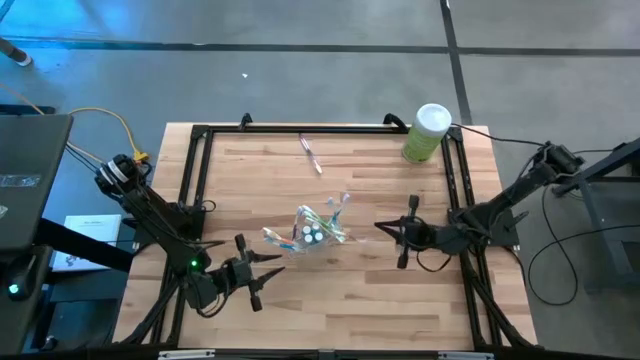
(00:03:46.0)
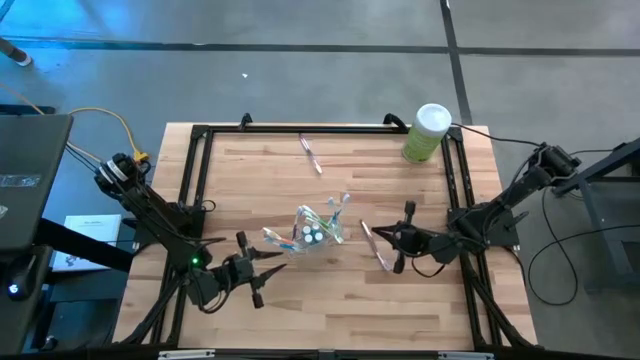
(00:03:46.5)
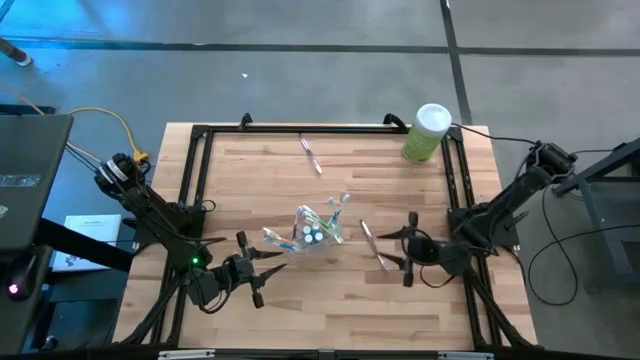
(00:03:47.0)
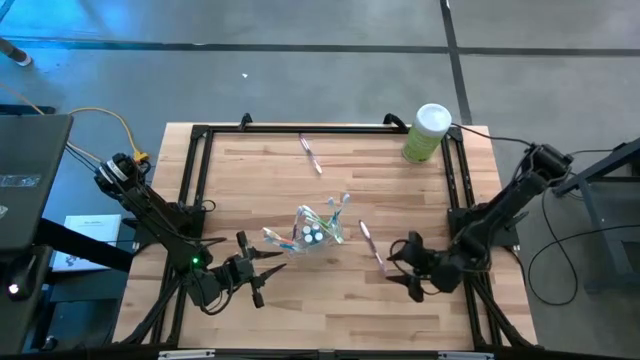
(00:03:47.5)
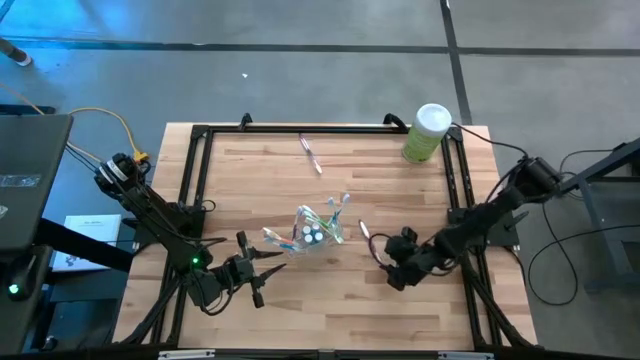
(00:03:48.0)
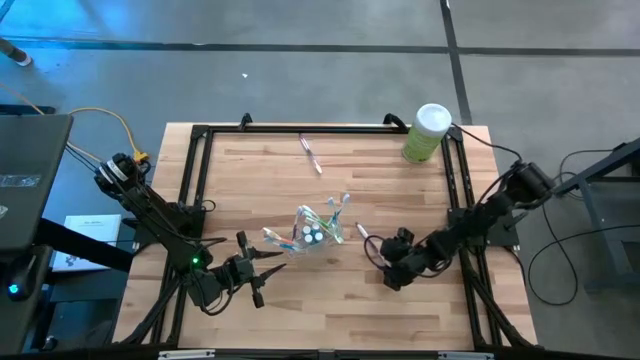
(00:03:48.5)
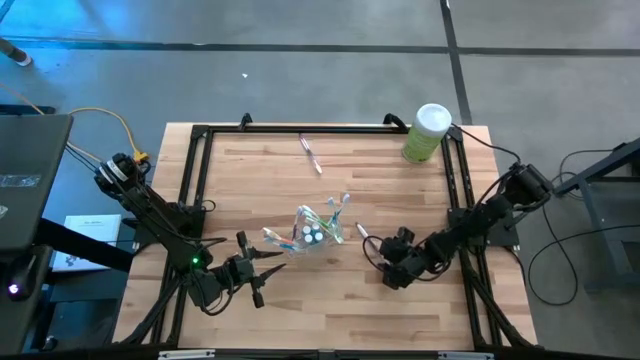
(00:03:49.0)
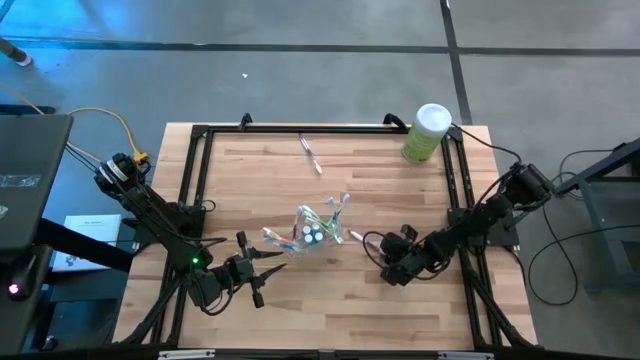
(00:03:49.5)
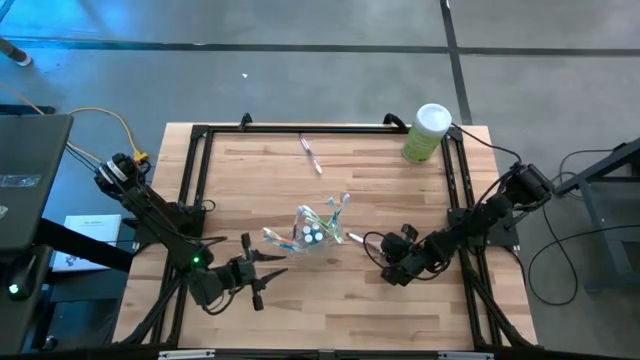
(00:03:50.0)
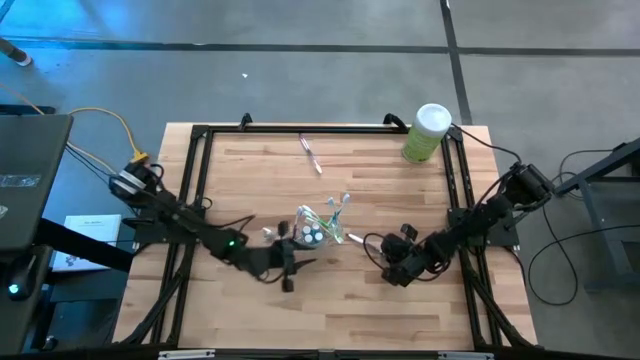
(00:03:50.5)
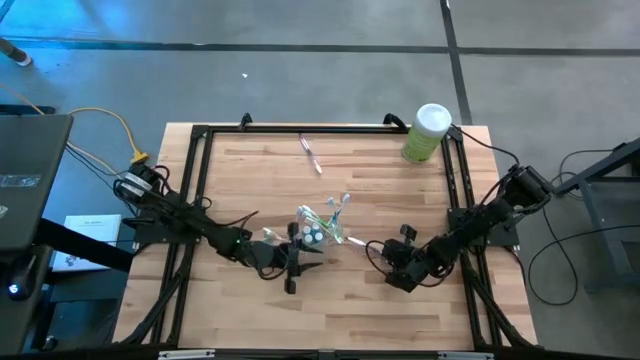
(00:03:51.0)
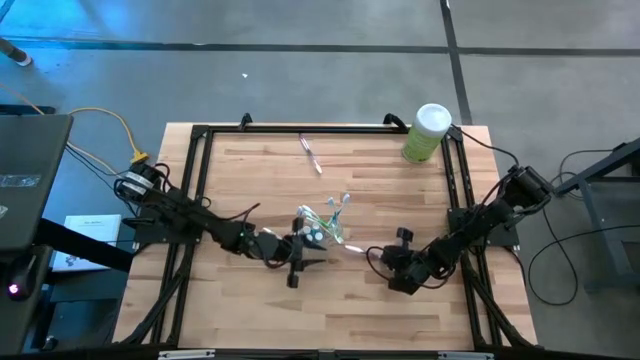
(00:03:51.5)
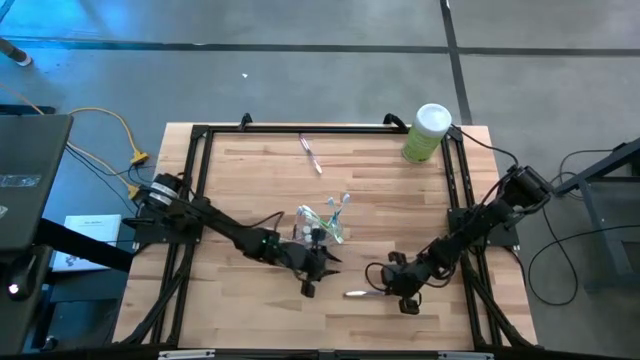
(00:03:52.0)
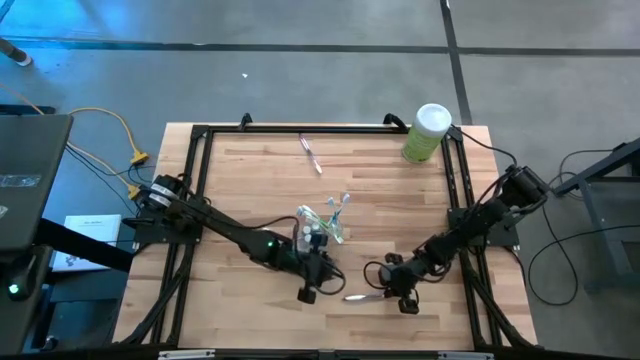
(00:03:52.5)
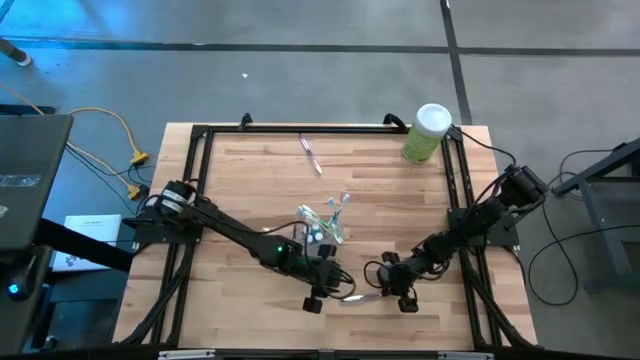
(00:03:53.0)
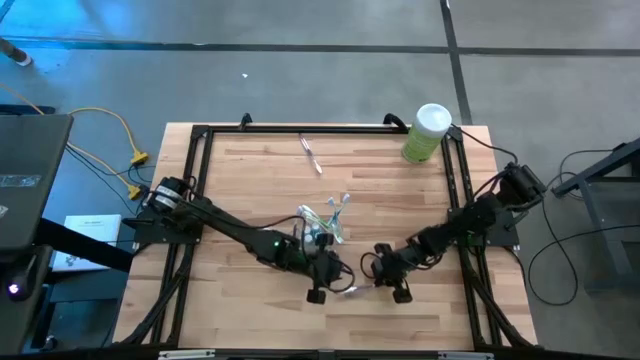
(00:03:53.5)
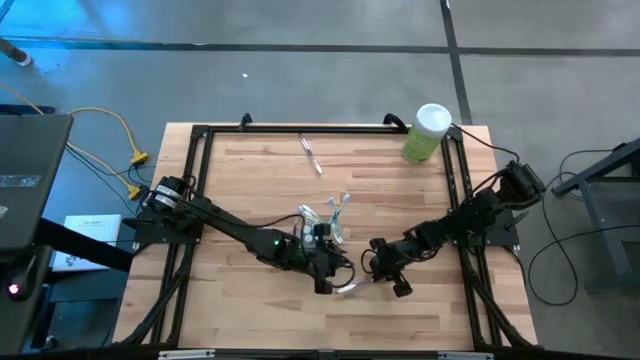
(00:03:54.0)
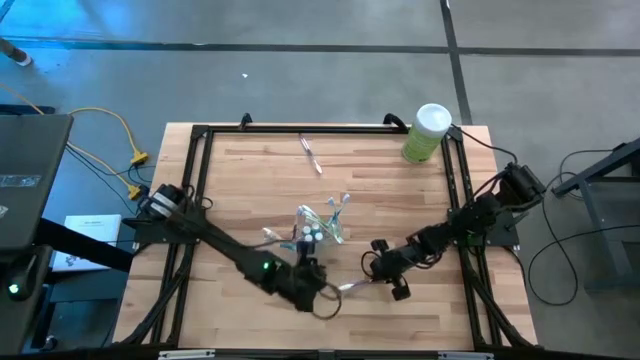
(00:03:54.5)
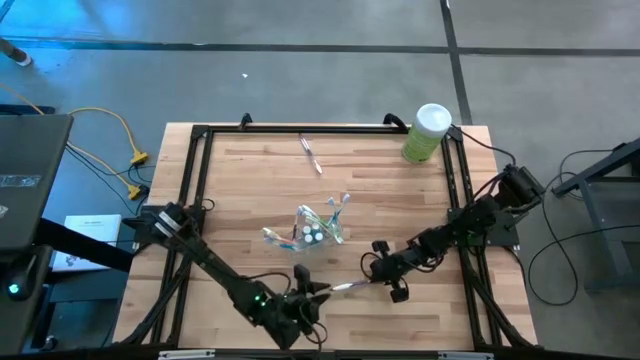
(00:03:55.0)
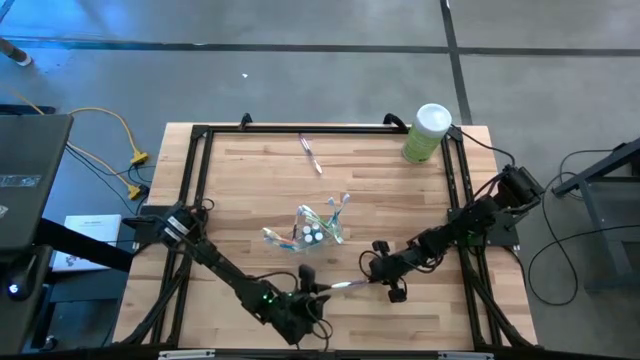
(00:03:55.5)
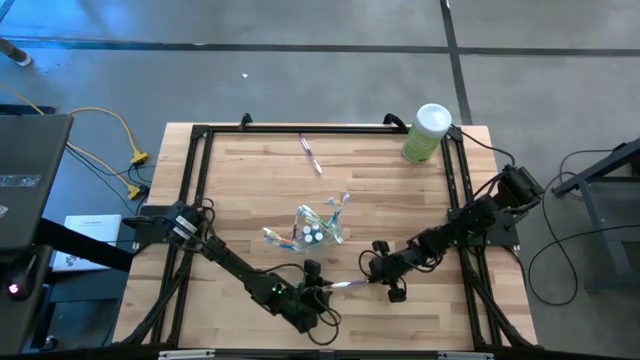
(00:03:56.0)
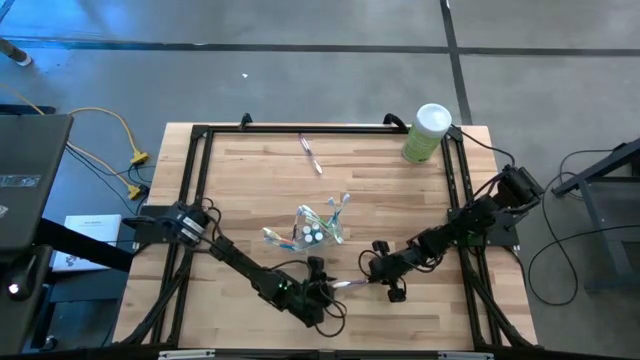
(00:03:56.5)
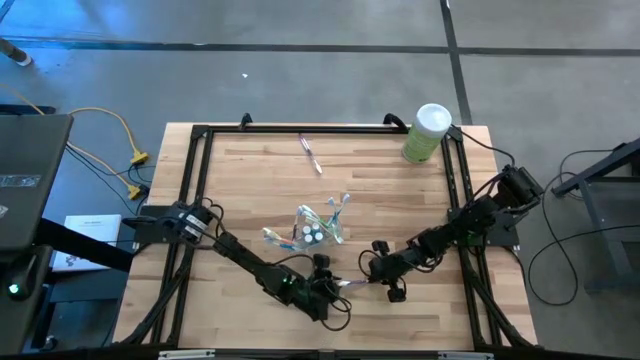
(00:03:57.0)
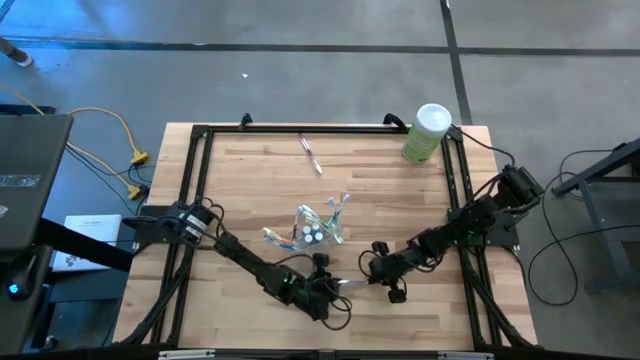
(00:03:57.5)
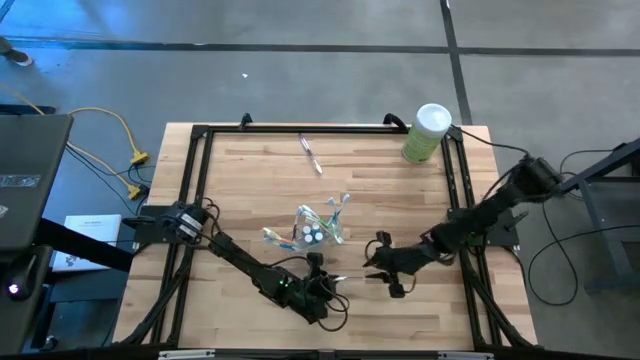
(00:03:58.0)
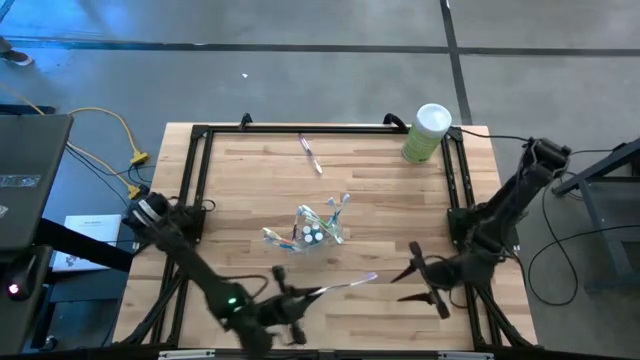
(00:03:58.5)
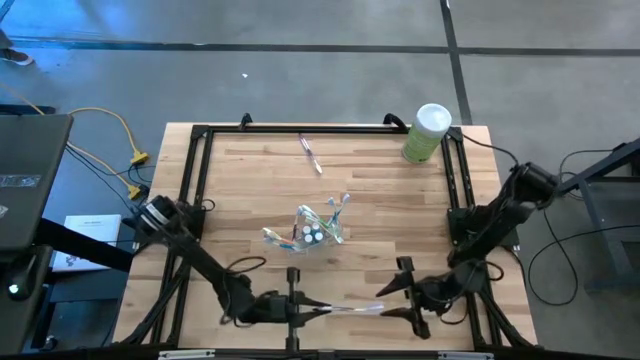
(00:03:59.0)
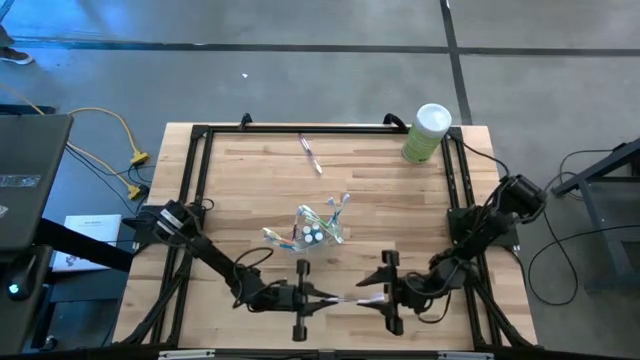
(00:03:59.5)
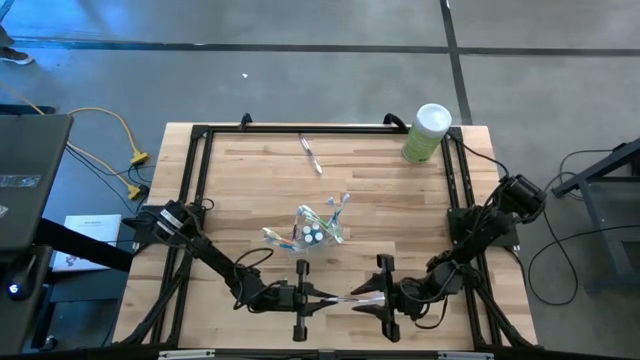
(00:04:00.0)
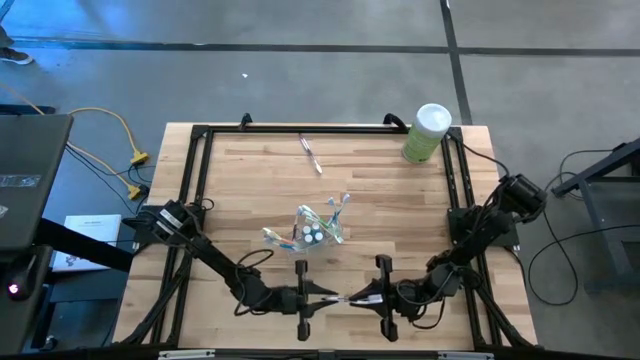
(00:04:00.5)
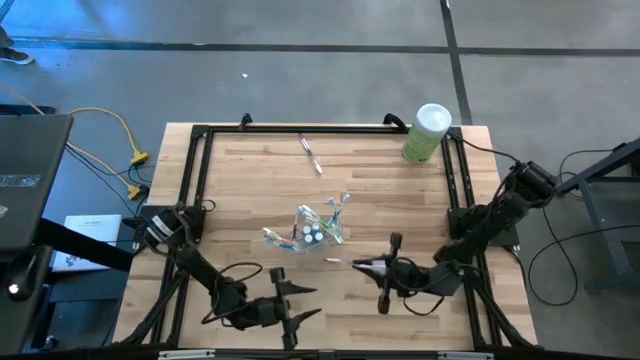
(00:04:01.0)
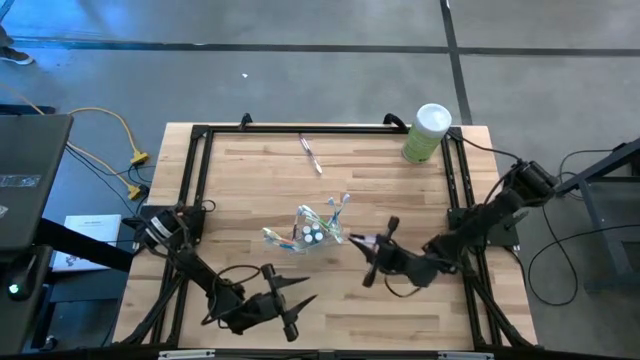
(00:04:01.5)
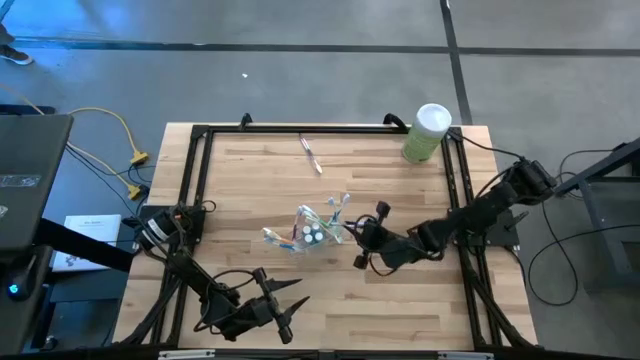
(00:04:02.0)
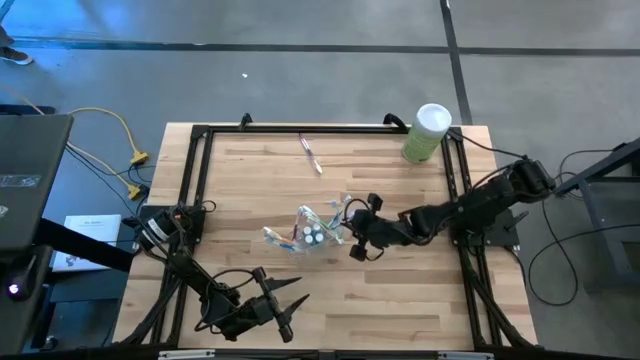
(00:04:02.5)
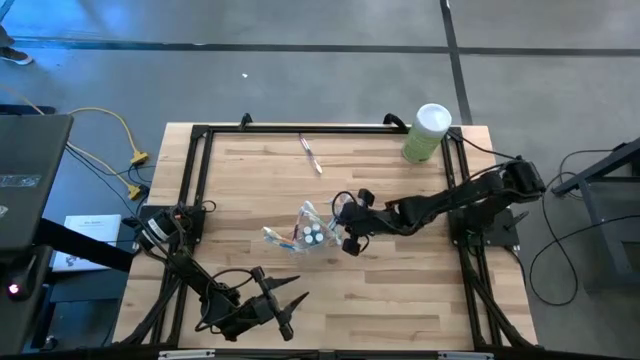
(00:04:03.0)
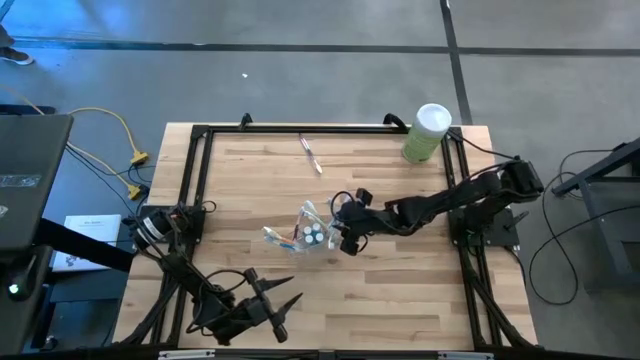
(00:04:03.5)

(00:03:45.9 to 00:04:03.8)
Task: Pick & Place toothbrushing station
Put the violet toothbrush into the transparent organizer

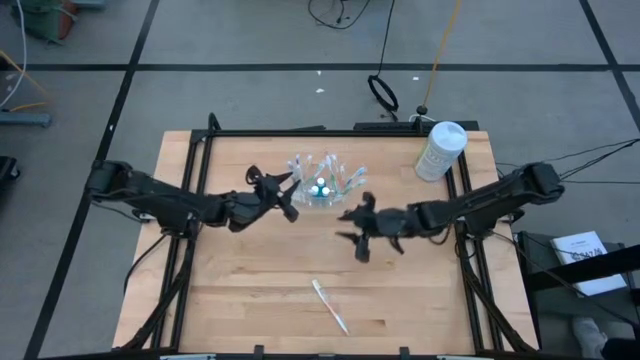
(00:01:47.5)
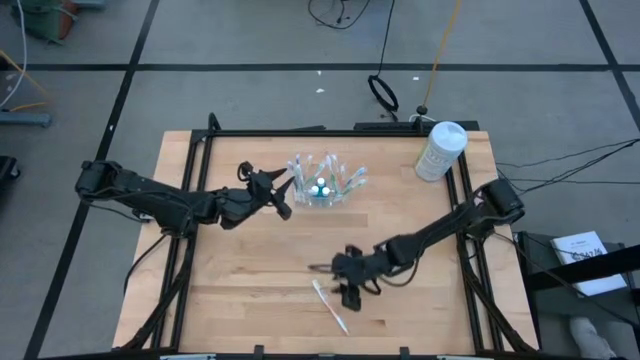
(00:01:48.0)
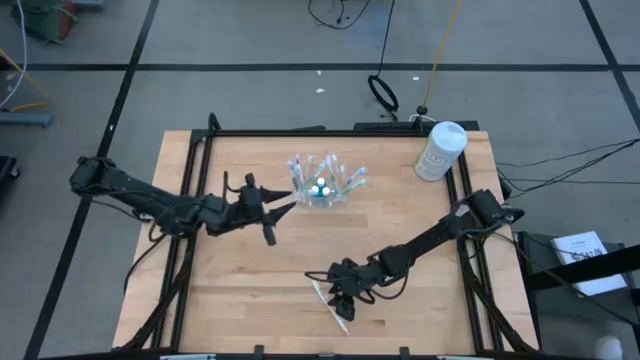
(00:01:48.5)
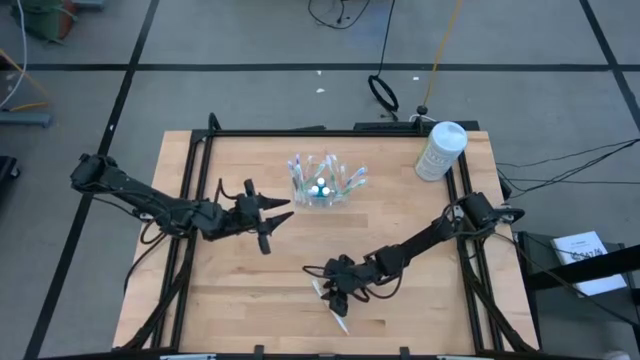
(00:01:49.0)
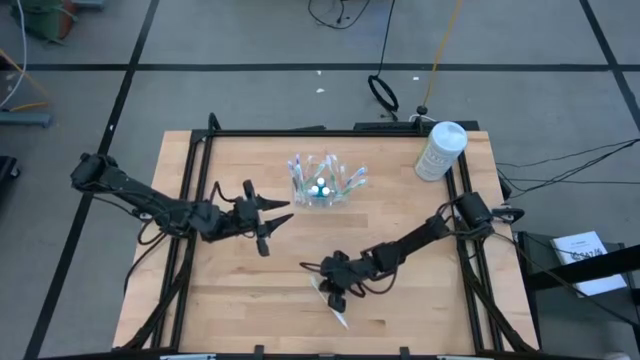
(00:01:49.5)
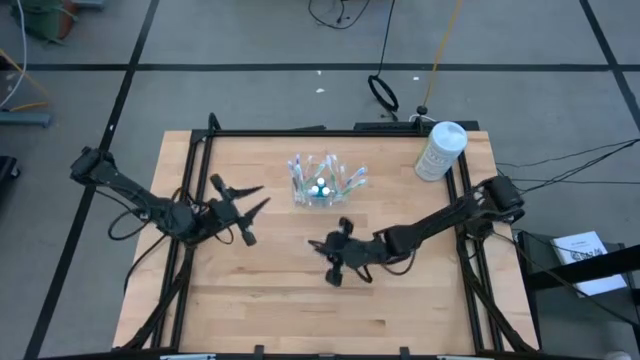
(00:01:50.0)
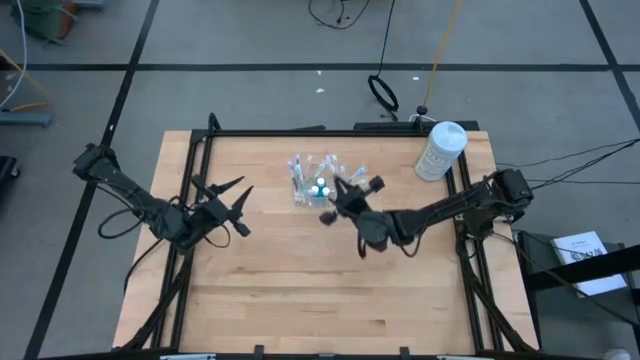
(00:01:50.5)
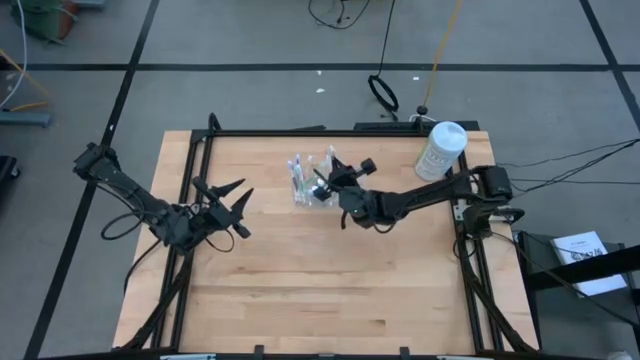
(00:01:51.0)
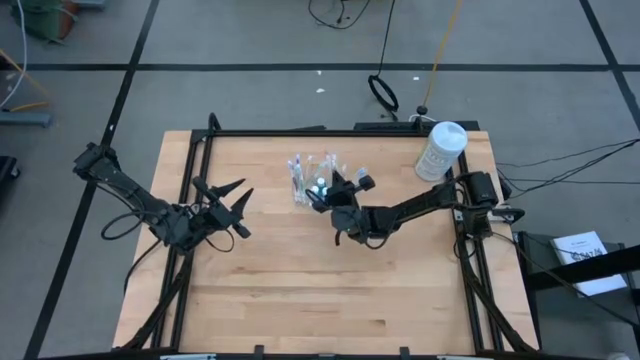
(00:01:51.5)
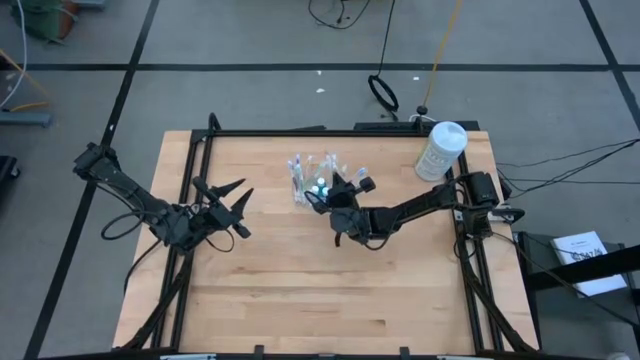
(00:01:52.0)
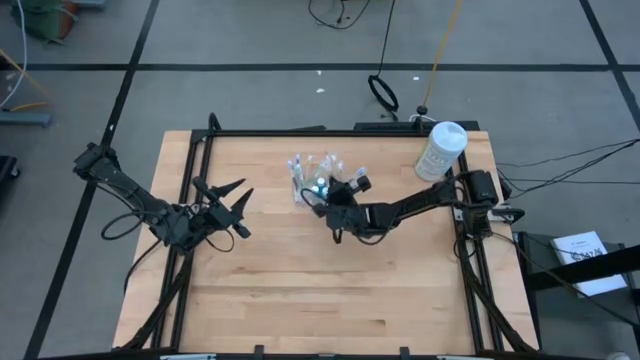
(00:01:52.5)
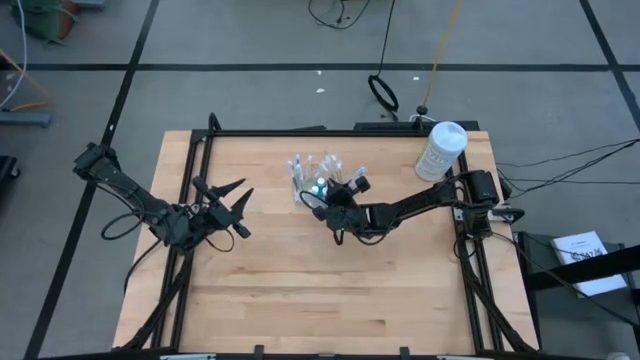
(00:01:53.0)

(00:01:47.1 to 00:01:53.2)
Task: Pick & Place Toothbrushes
Put the orange toothbrush into the transparent organizer
